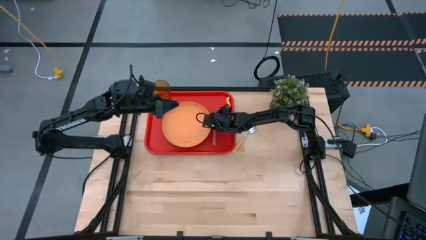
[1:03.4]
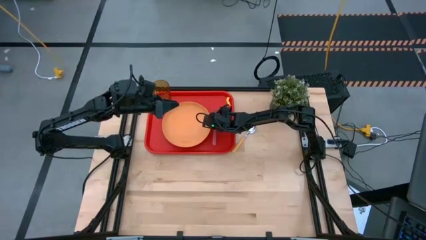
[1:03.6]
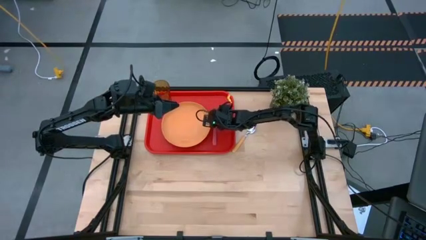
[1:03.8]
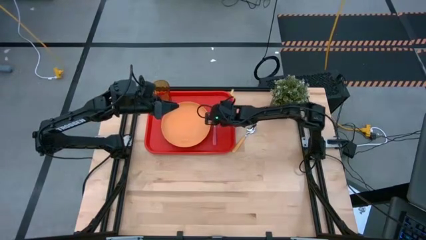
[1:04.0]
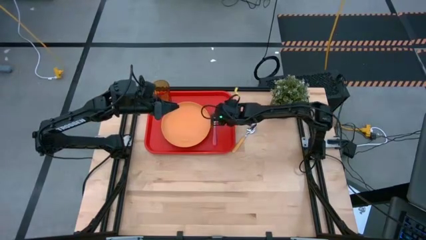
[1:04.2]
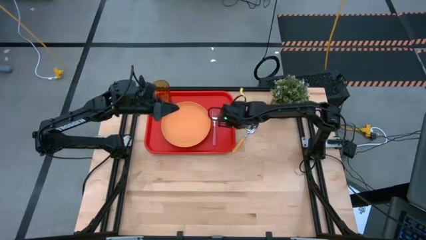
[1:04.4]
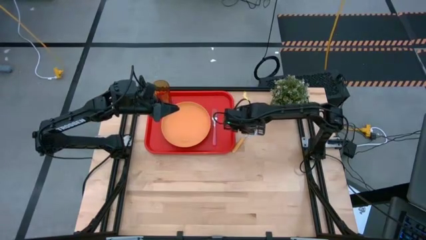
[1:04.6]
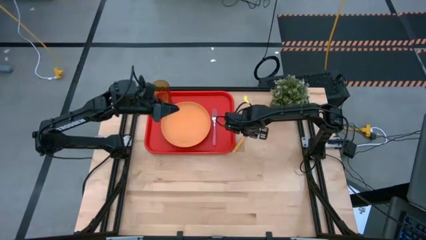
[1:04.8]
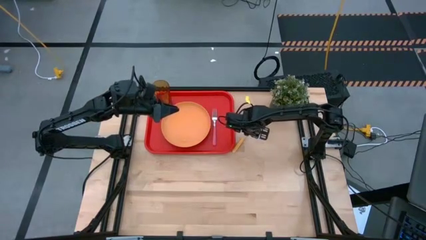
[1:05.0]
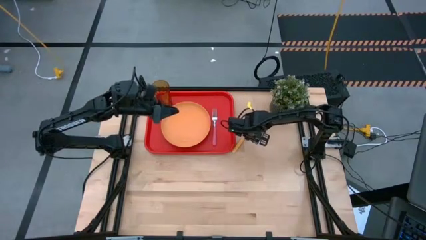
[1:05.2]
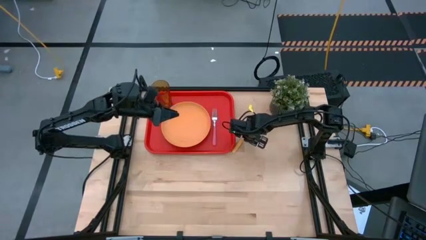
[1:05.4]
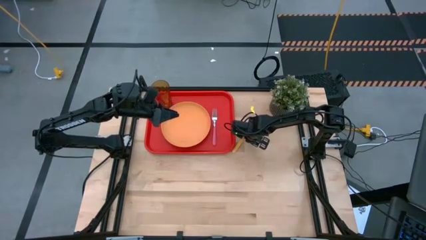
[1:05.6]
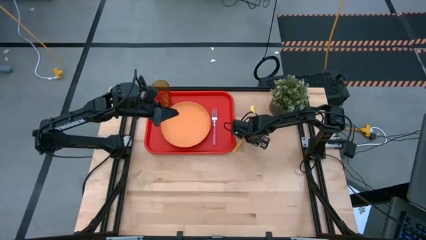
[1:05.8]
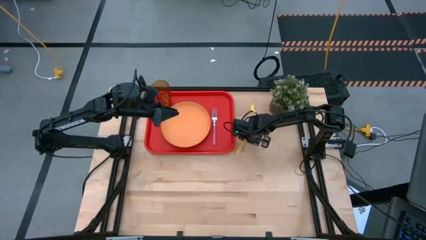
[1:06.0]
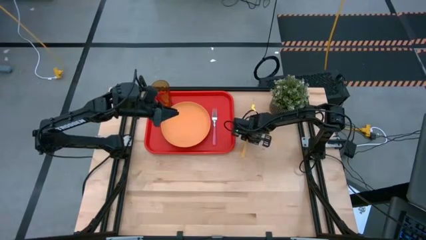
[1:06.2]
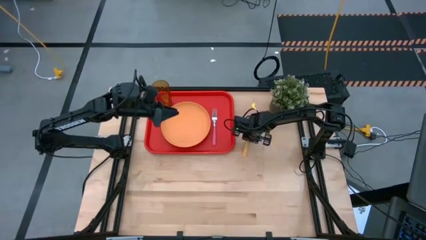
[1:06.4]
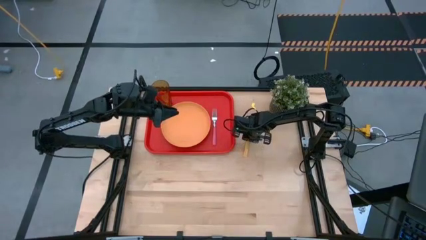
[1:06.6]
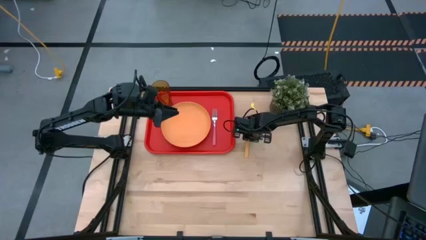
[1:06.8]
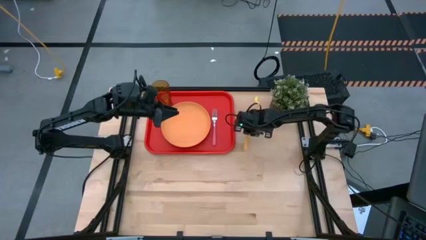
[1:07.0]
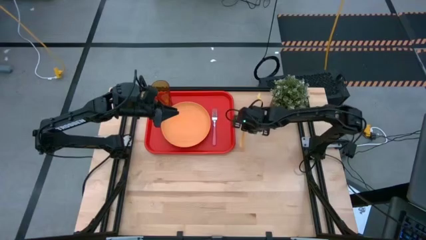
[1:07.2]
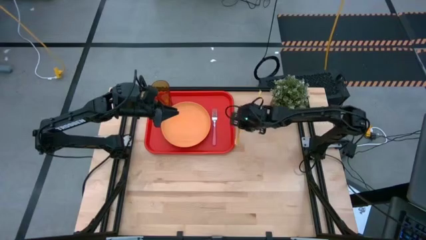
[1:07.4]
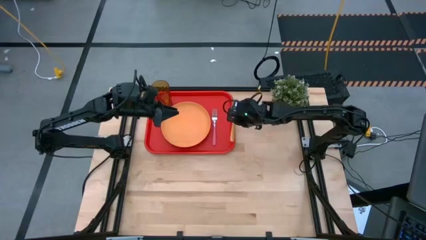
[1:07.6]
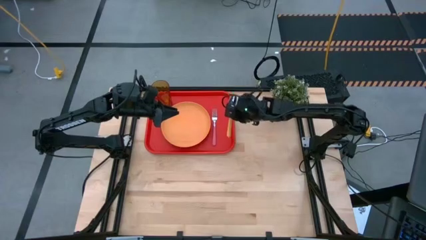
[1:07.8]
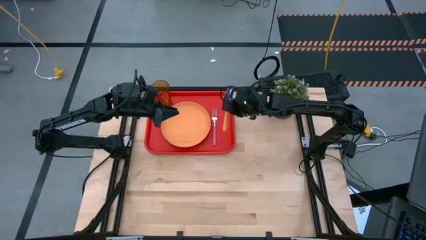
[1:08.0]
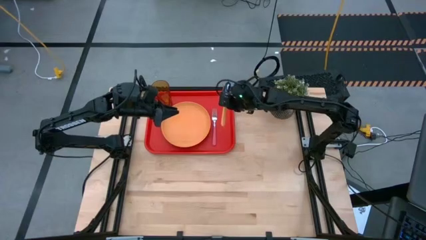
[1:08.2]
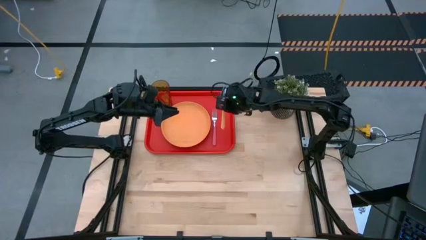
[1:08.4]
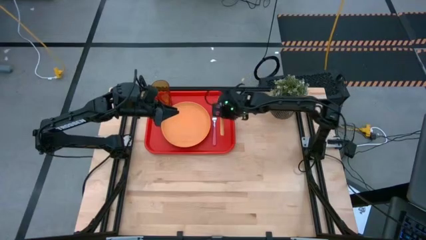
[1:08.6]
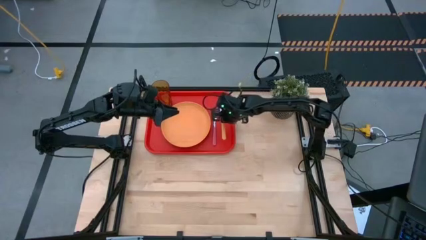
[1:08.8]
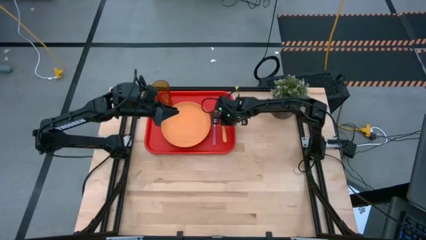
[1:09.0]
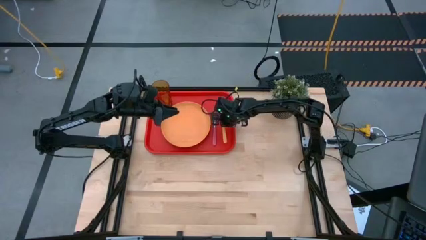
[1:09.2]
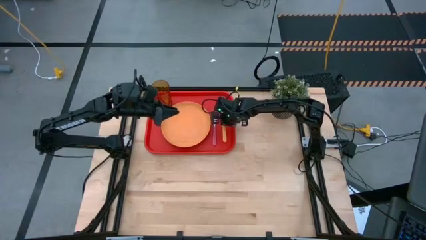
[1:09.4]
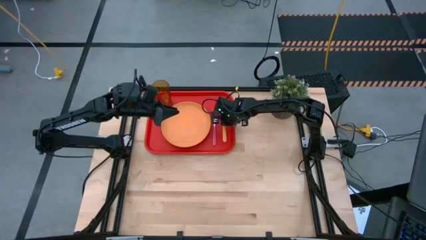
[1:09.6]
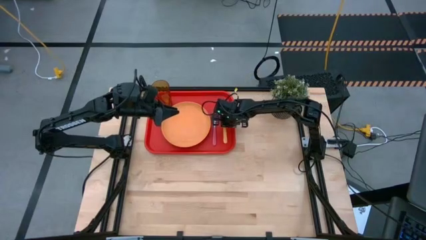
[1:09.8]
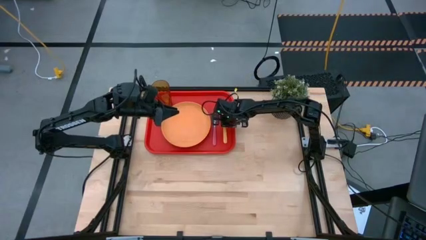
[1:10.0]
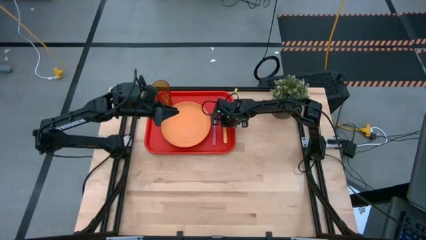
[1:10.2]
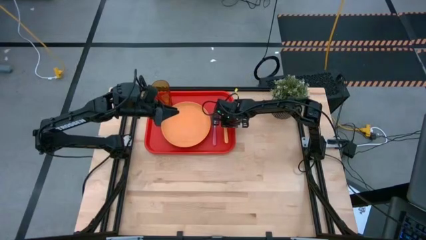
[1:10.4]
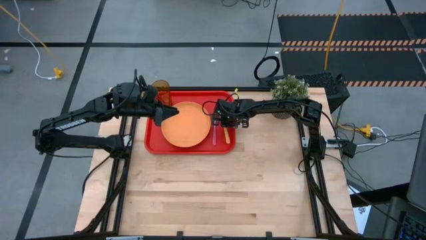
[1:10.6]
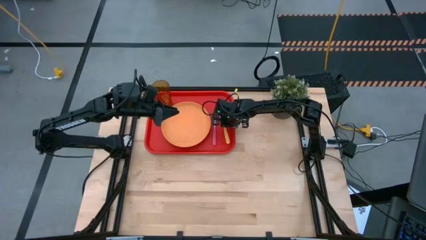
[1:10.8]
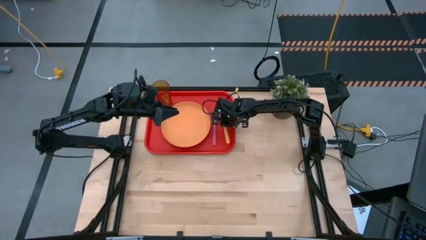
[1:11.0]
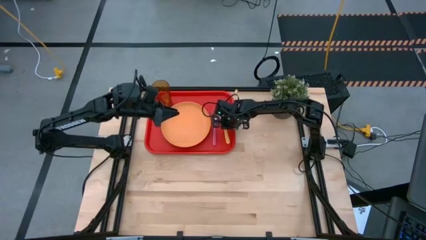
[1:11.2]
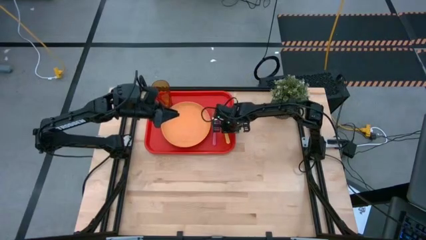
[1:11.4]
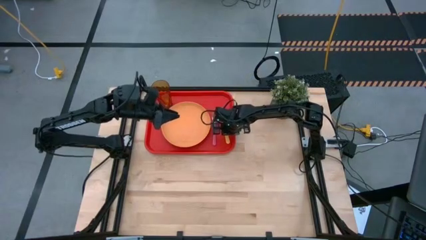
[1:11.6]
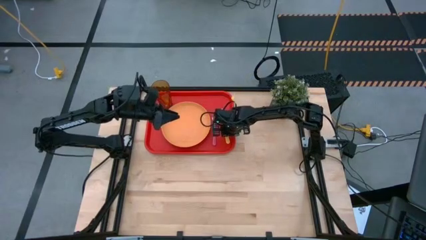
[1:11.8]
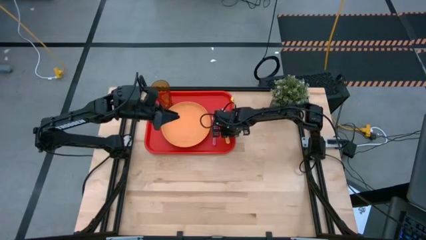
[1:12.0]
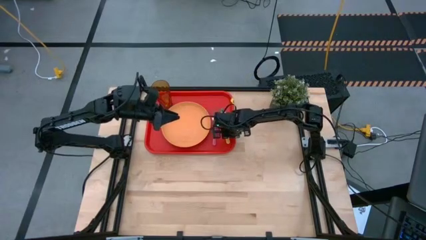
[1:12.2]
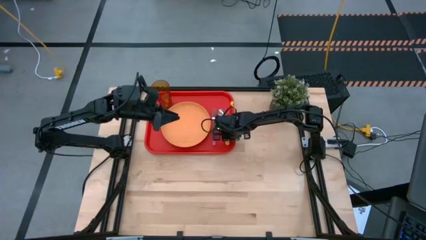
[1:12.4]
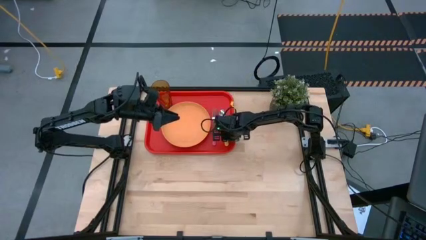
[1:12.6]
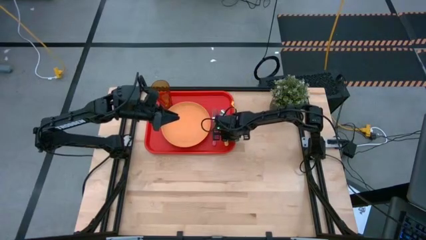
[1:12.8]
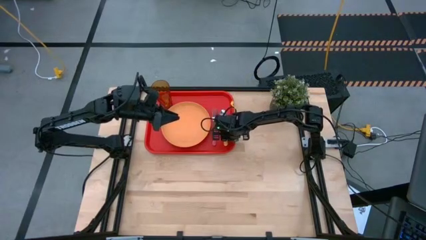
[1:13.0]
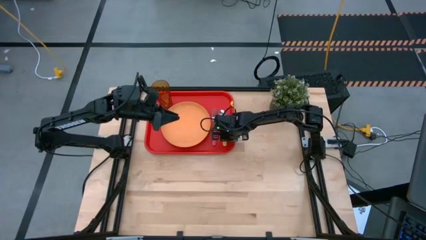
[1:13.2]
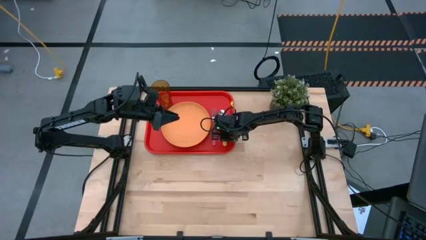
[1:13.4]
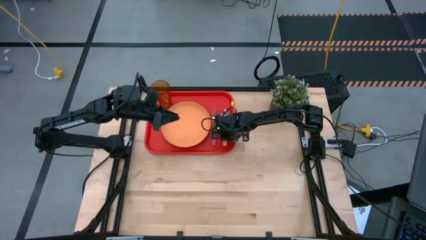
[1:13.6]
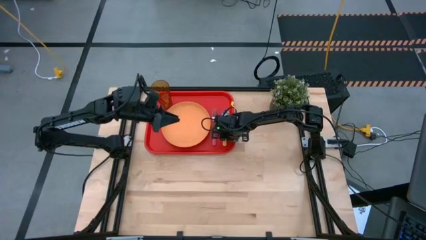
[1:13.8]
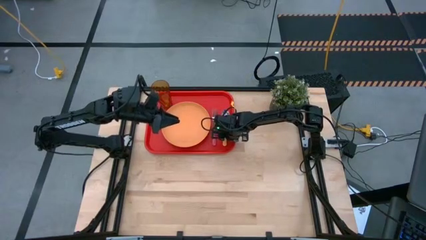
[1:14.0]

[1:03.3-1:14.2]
Task: Pick and place plate/cup/fork/spoon on tray
Put the yellow spoon on the red tray to the right of the pink fork

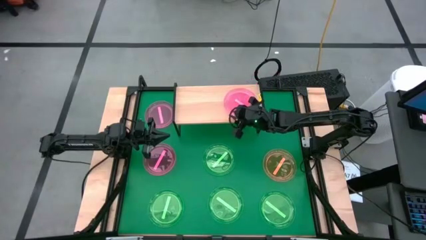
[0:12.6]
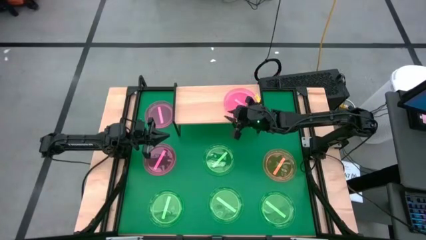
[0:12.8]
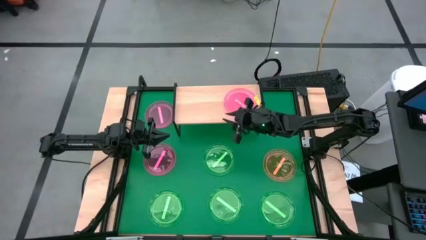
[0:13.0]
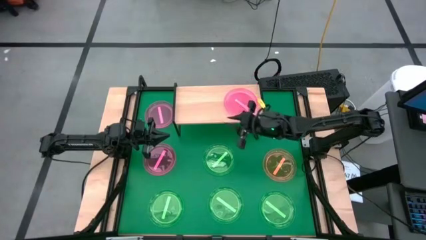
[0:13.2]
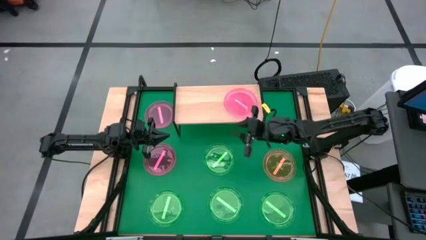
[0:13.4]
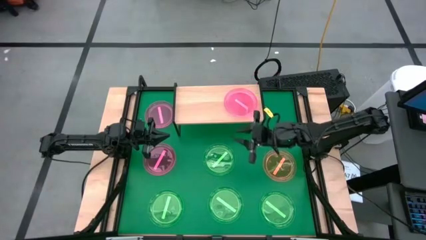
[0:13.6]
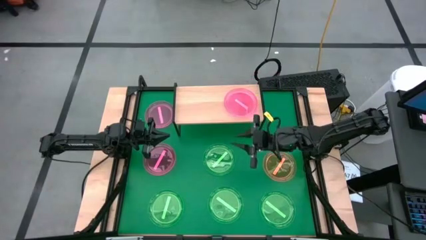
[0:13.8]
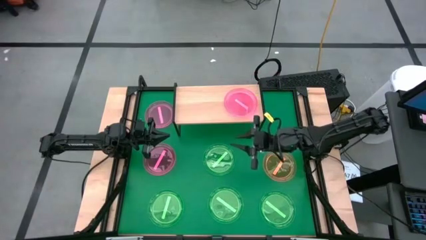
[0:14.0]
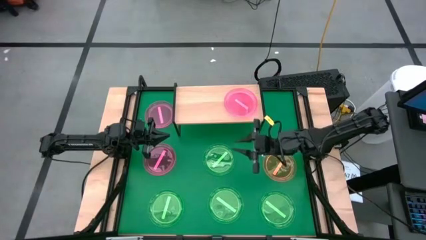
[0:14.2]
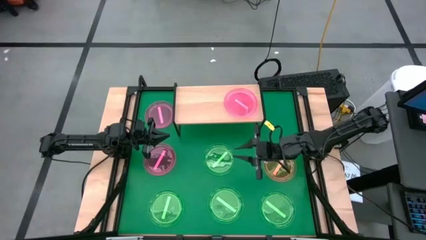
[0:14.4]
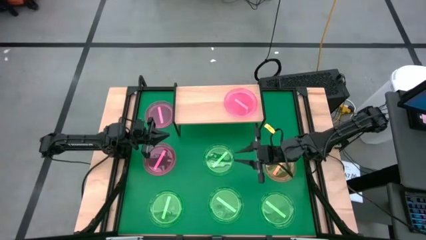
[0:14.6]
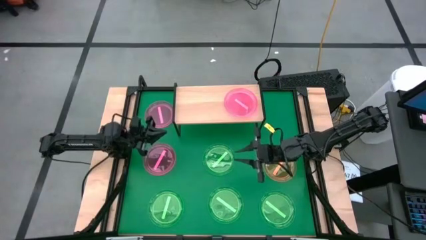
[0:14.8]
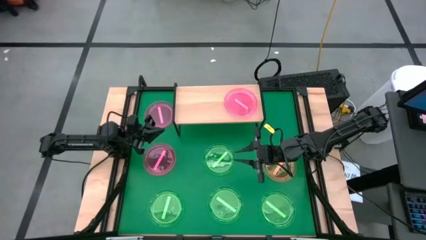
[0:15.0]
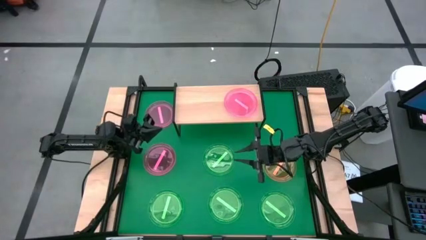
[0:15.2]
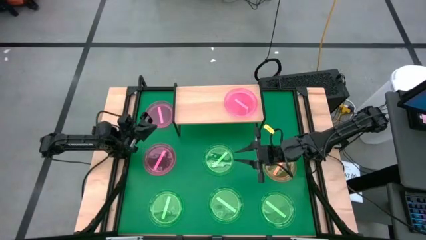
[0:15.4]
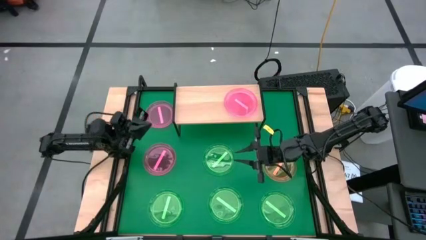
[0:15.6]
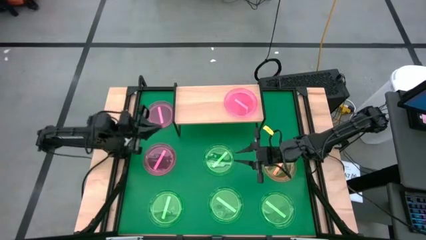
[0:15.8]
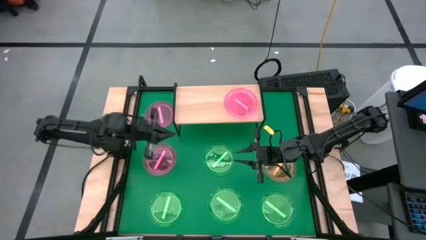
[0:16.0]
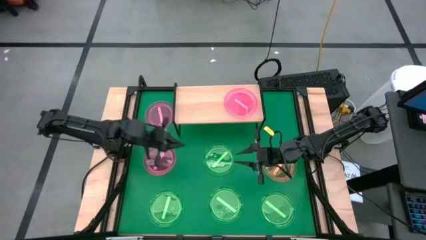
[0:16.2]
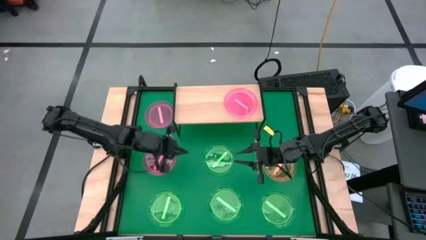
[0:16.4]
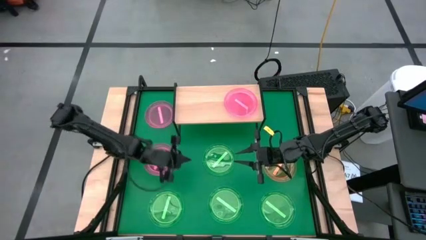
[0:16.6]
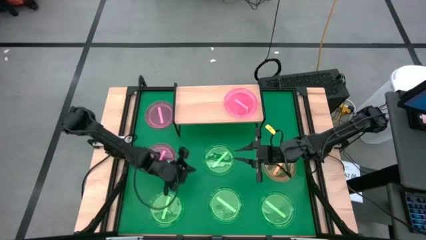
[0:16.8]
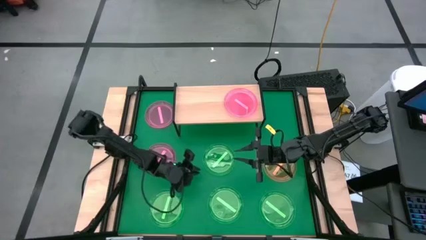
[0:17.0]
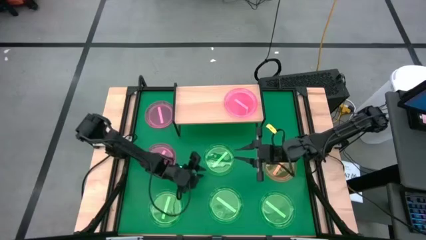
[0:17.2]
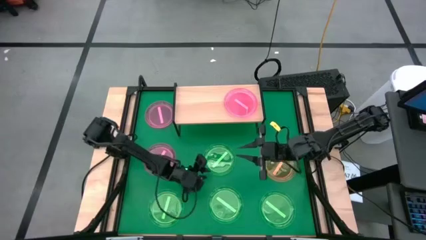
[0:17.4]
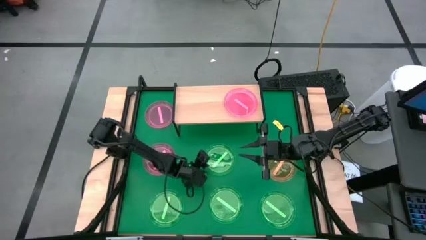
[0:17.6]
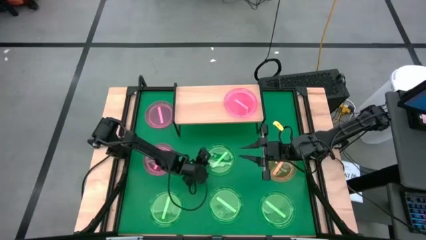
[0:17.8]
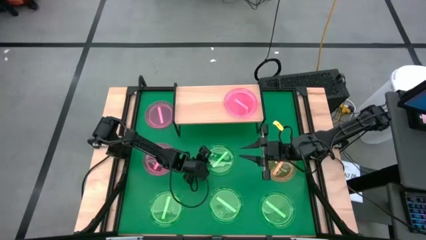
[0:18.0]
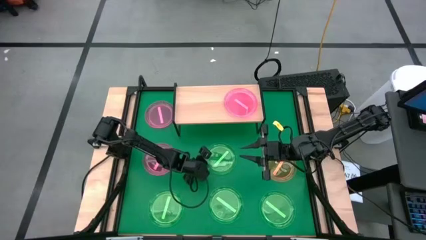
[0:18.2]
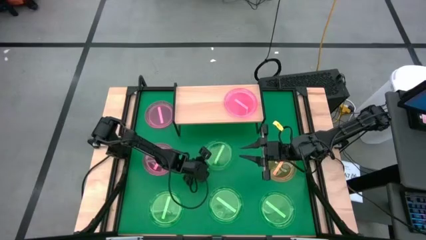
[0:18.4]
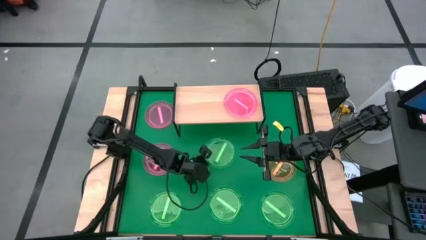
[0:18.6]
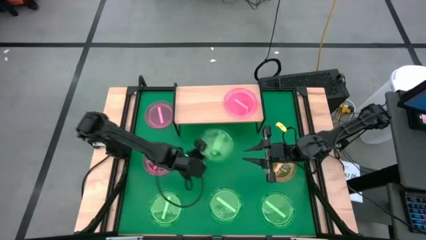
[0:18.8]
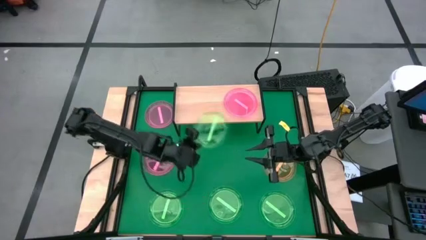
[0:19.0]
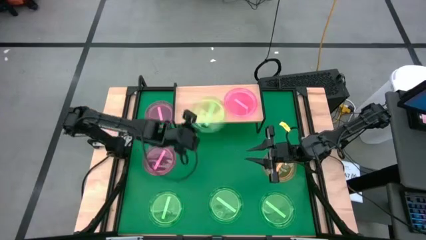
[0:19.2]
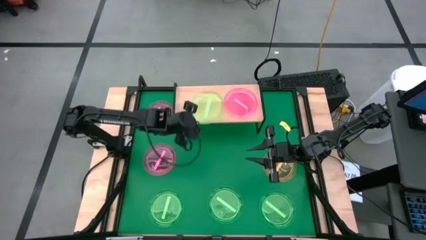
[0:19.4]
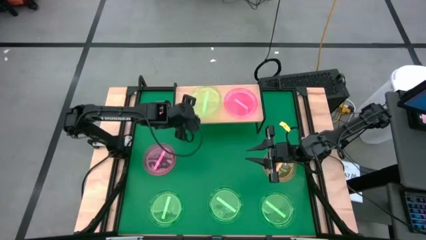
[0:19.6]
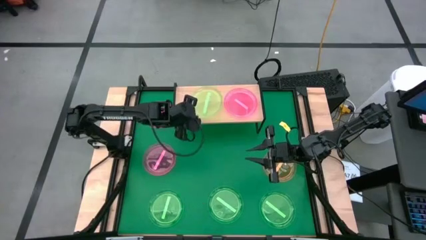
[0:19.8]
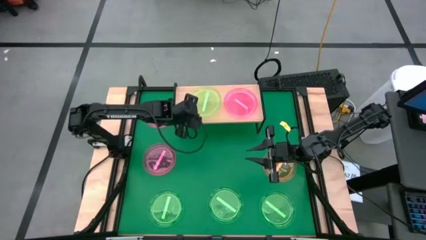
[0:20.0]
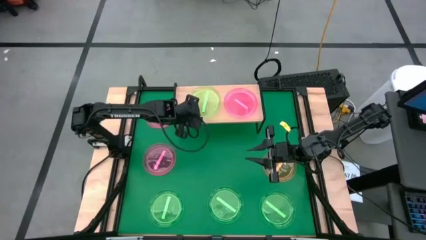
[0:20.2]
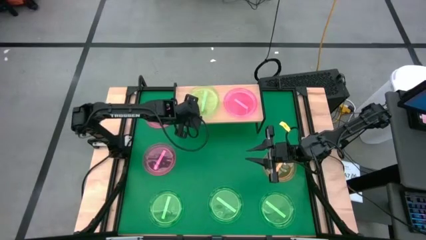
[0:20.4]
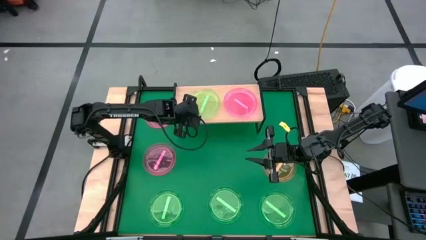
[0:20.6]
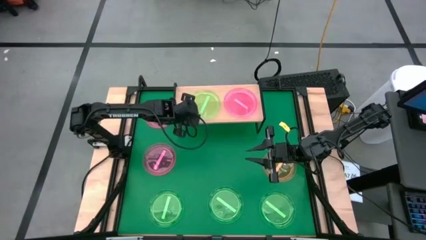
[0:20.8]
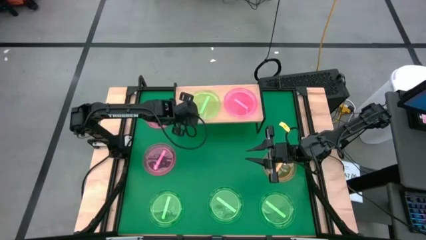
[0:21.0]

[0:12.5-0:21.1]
Task: Place and stack plates onto a shelf
Put the top green transparent plate on the shelf
